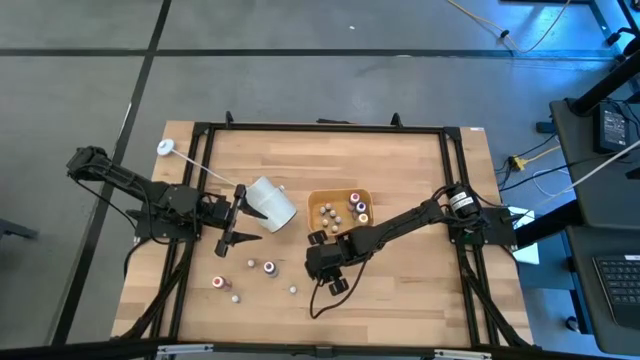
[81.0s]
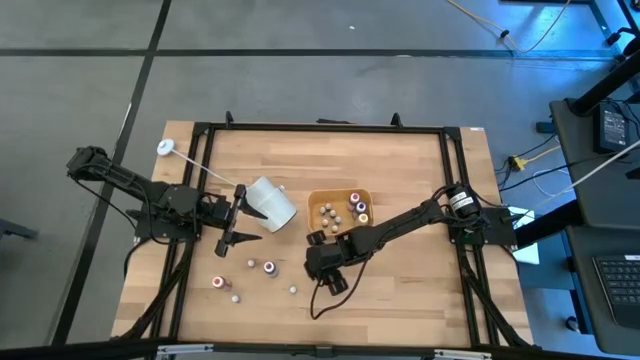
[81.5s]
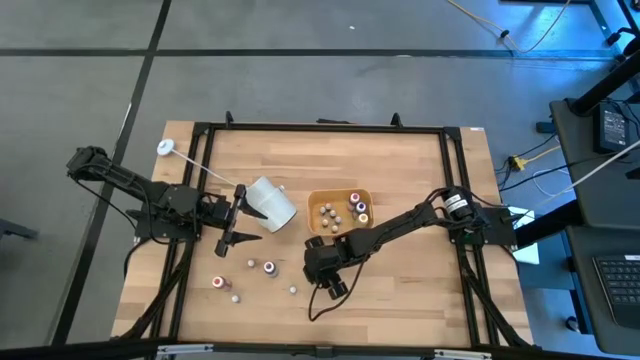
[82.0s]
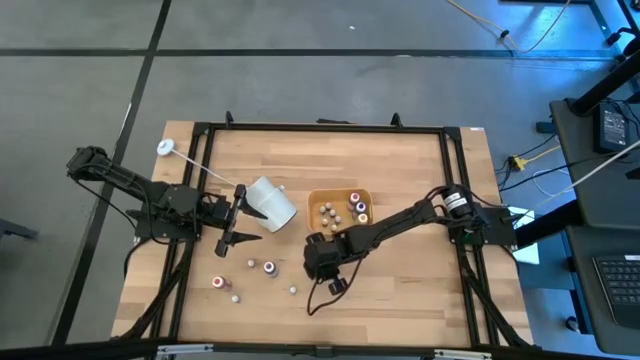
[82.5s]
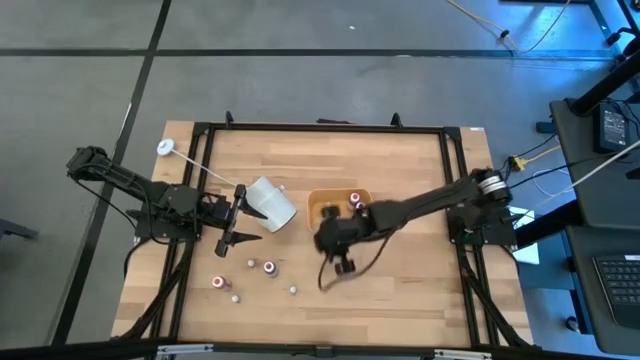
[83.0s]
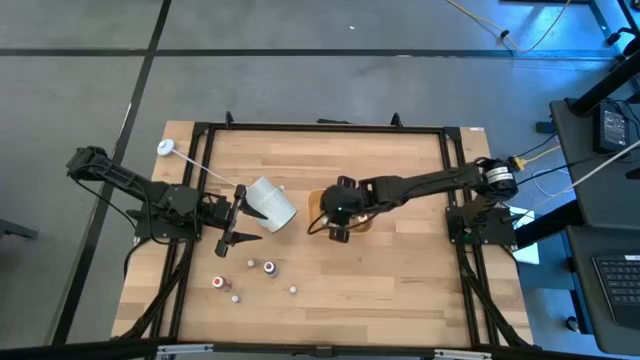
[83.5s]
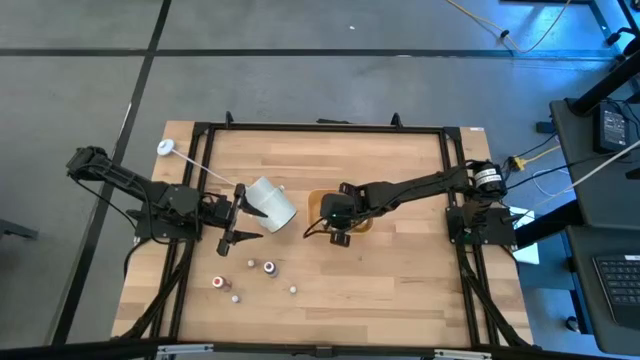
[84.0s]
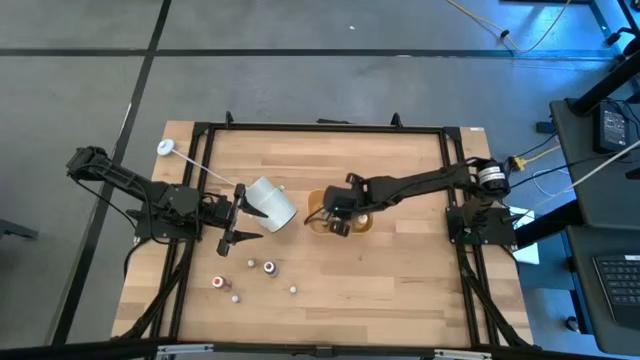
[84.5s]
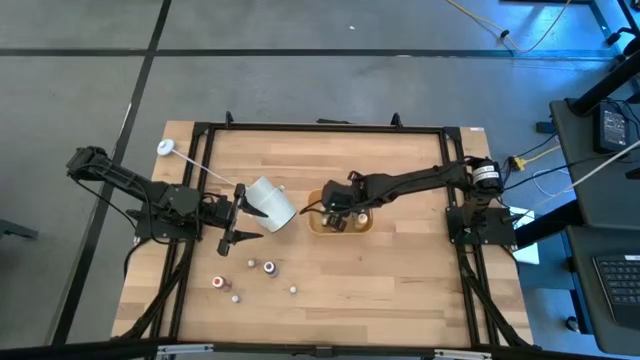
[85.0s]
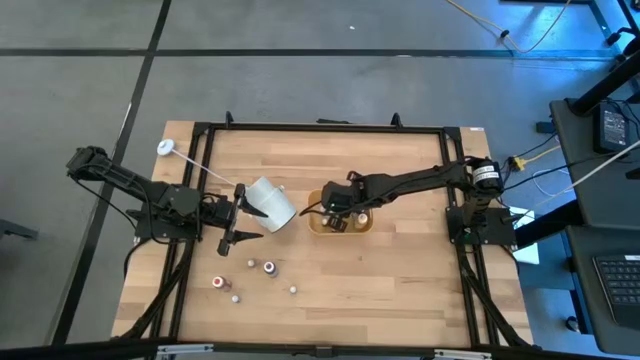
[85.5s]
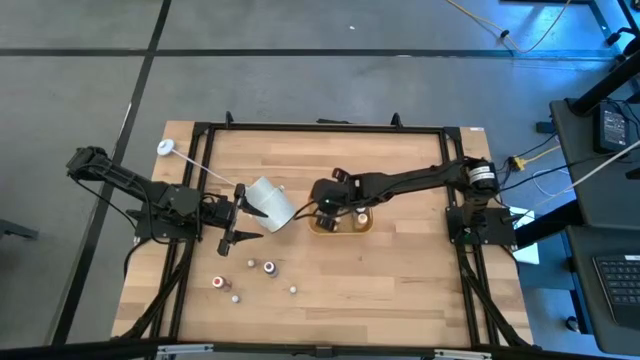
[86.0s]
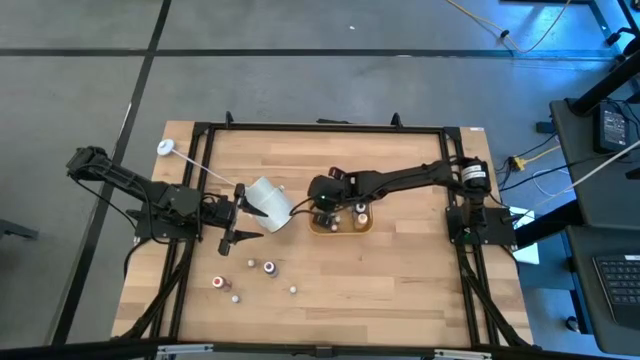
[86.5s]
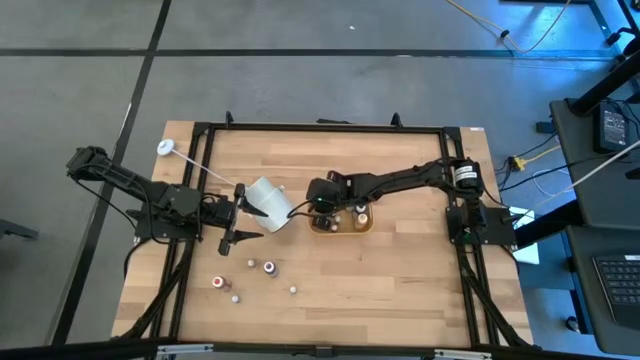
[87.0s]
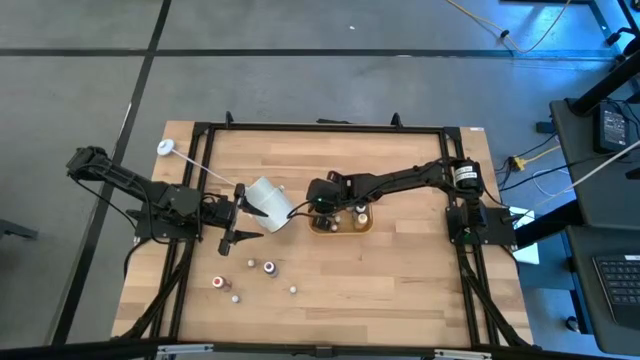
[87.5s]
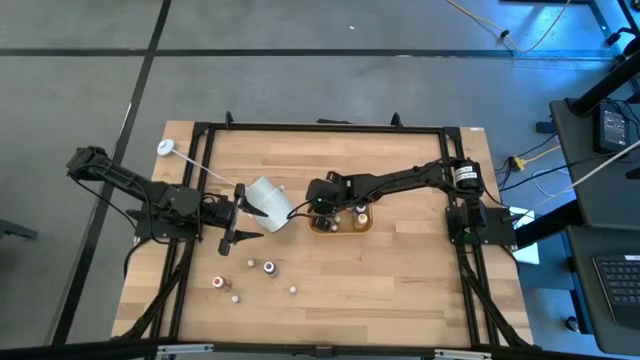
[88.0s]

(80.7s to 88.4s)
Task: Pick & Place food coloring
Put the small green food coloring bottle into the yellow bin

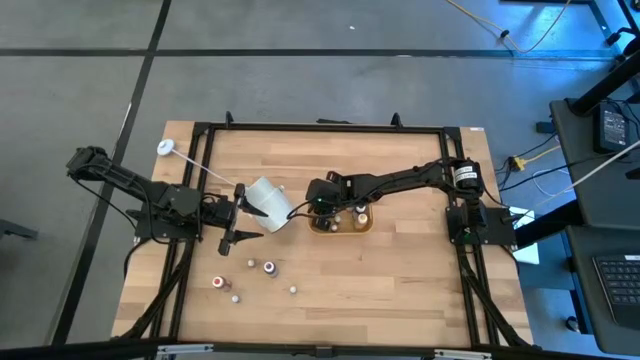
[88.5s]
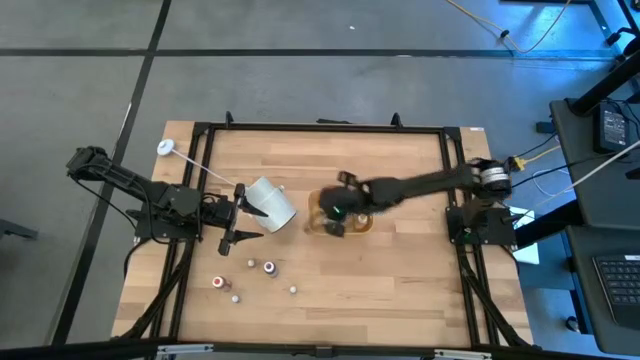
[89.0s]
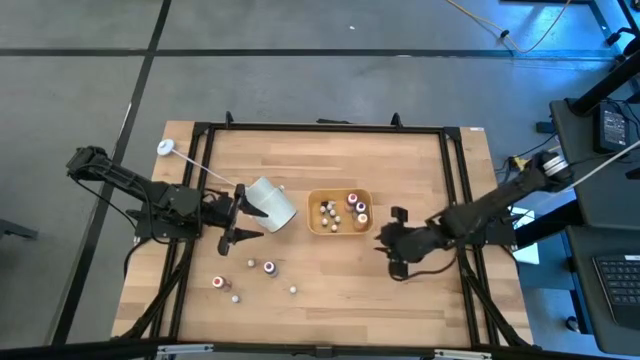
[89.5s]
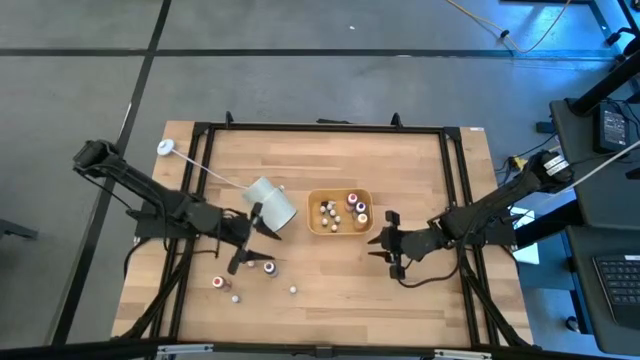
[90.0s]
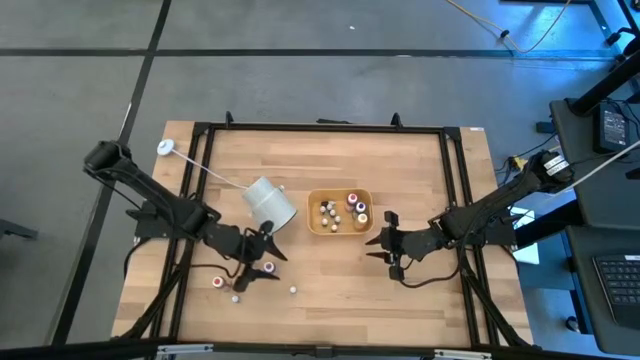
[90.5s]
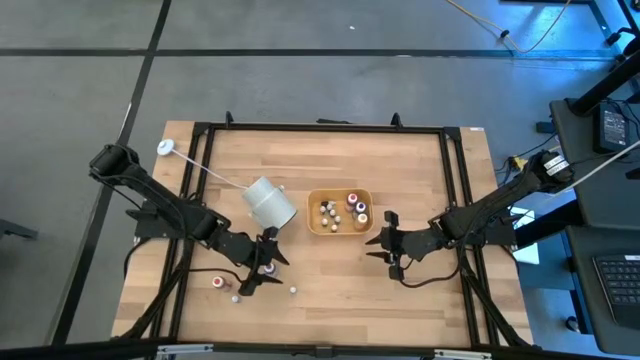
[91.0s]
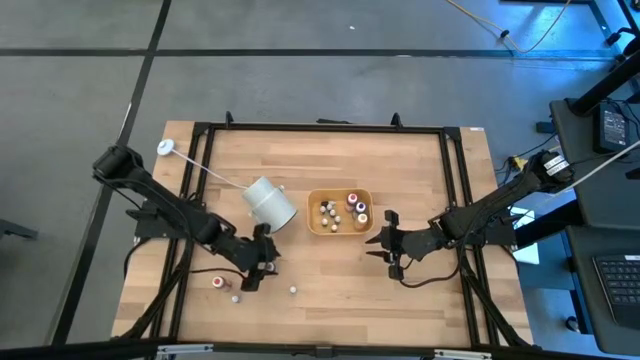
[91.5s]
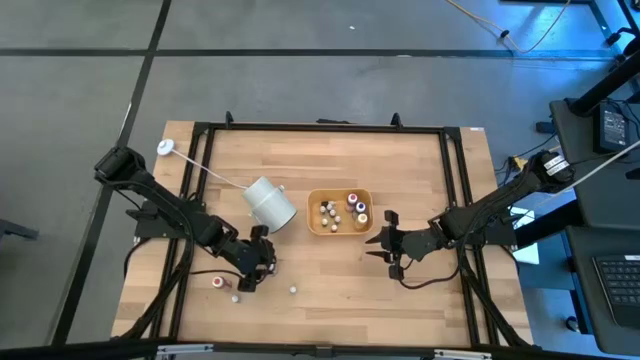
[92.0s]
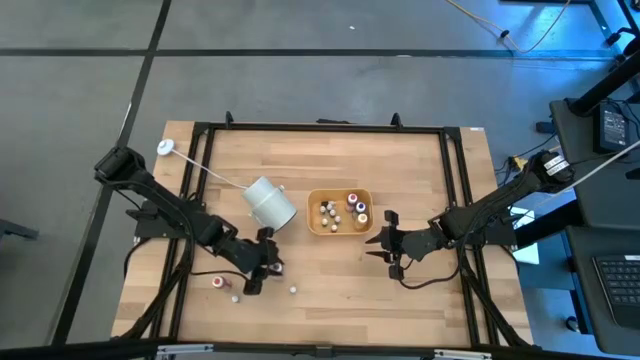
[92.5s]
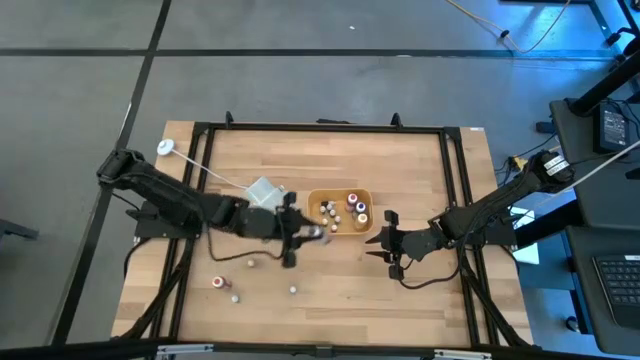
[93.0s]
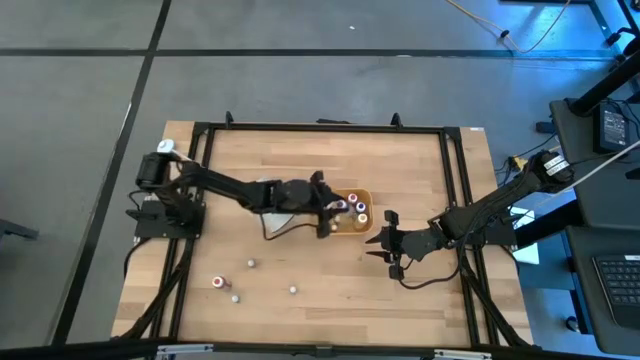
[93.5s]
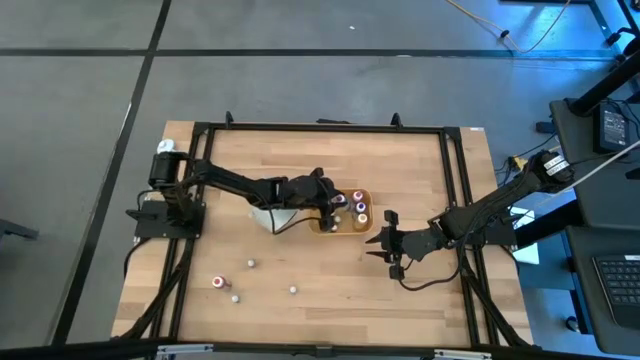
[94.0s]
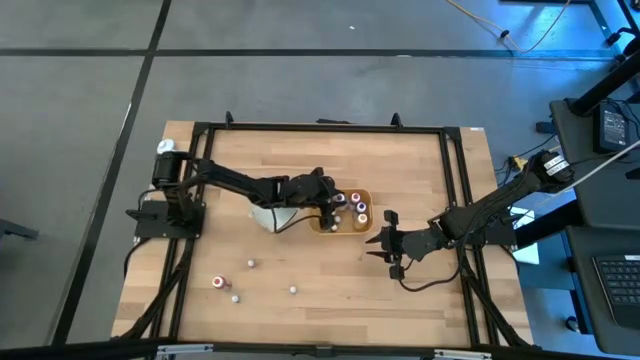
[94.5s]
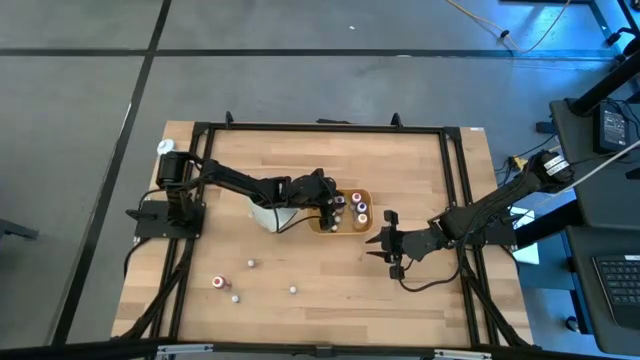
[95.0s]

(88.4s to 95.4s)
Put the large purple food coloring bottle into the yellow bin

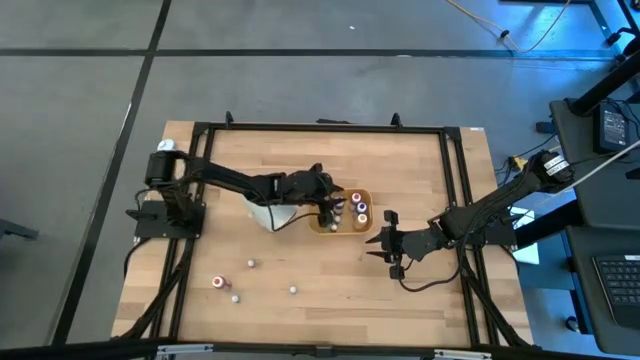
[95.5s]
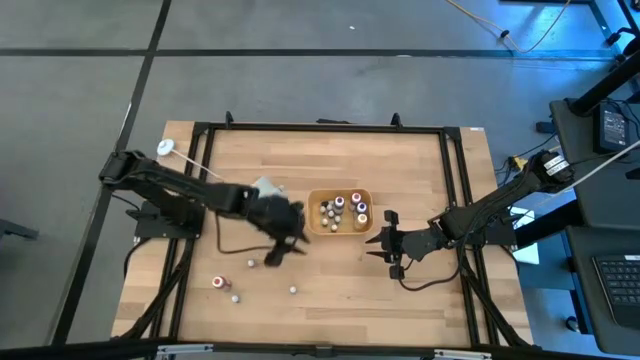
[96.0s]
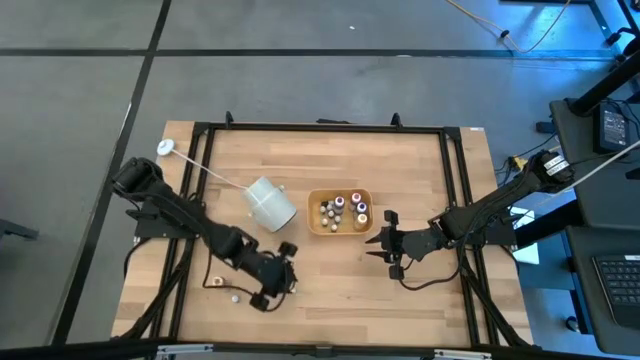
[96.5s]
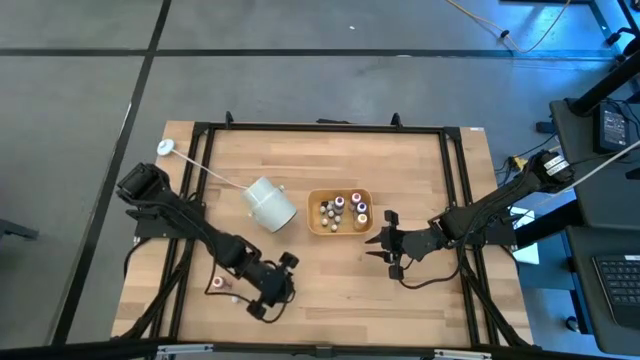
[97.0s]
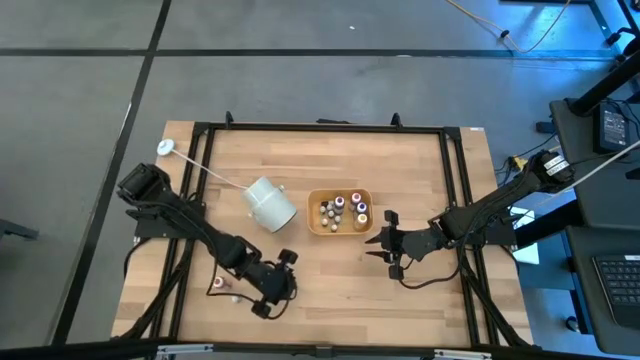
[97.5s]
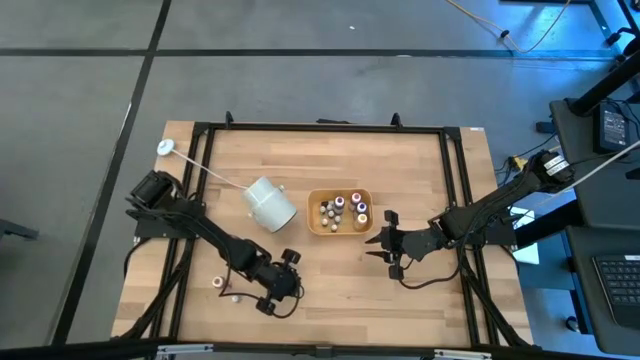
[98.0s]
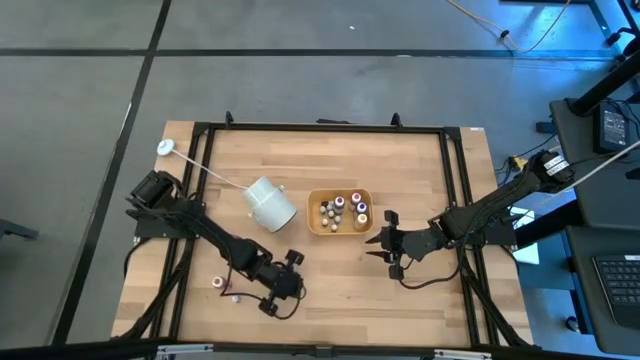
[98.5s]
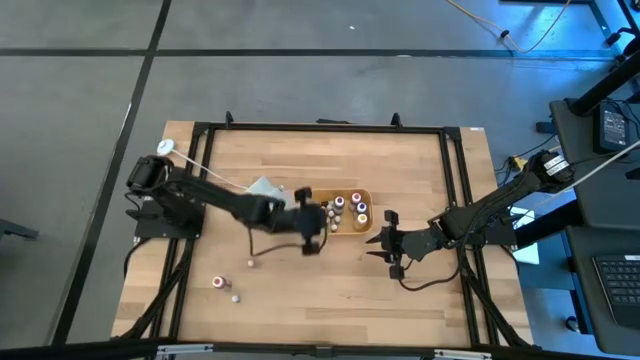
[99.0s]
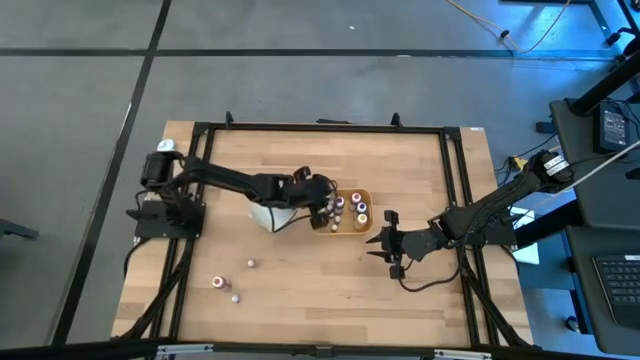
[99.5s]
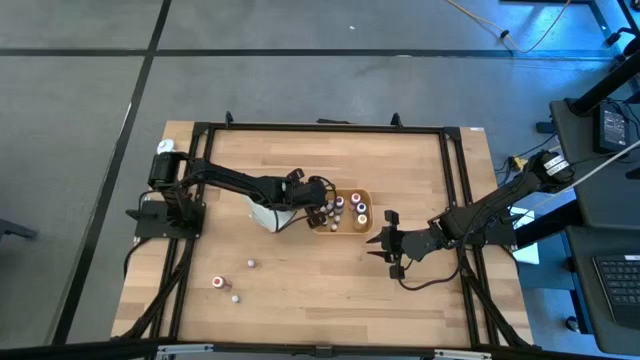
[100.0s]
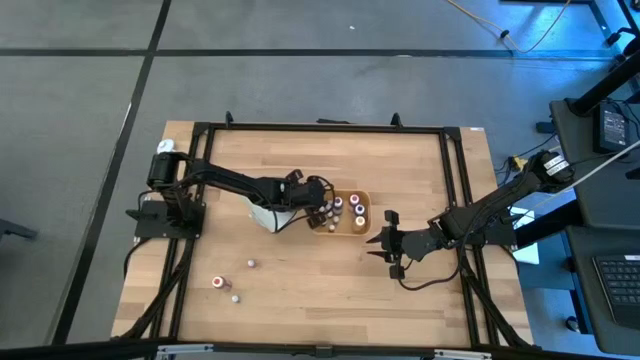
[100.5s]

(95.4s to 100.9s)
Put the small blue food coloring bottle into the yellow bin

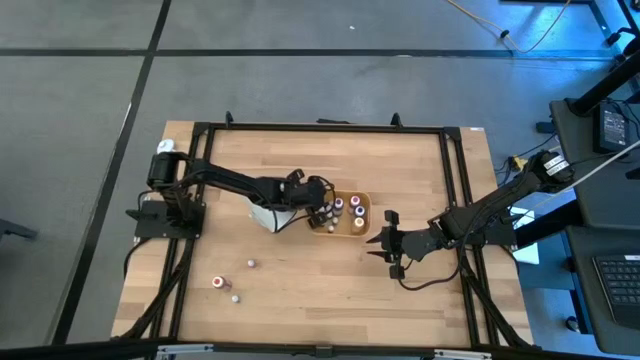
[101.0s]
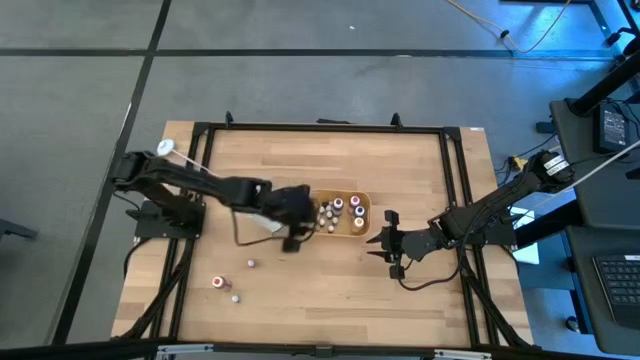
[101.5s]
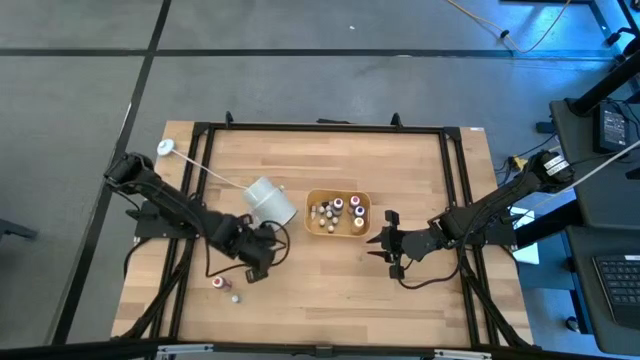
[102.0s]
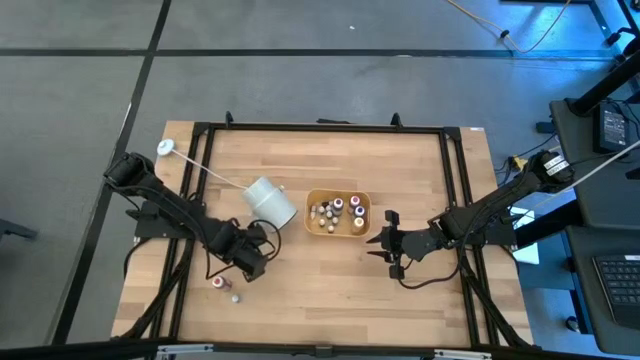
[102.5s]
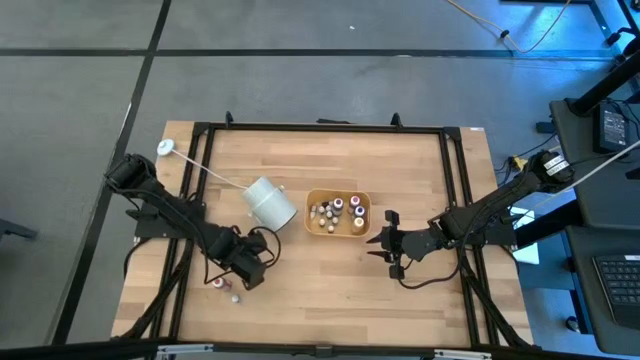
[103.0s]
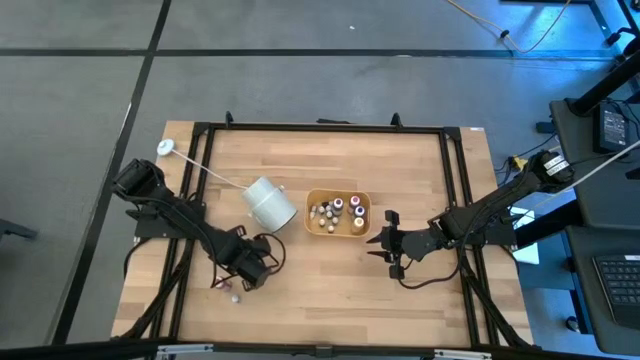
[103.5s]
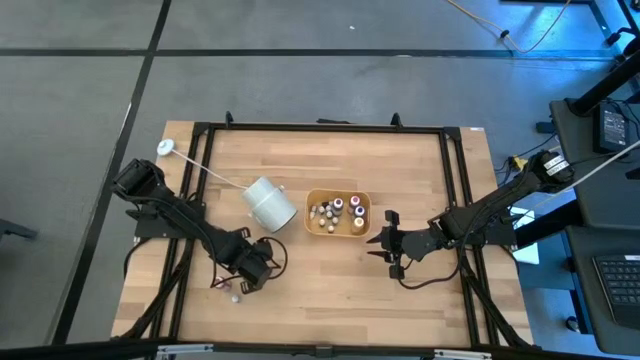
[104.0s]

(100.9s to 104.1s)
Put the small pink food coloring bottle into the yellow bin
